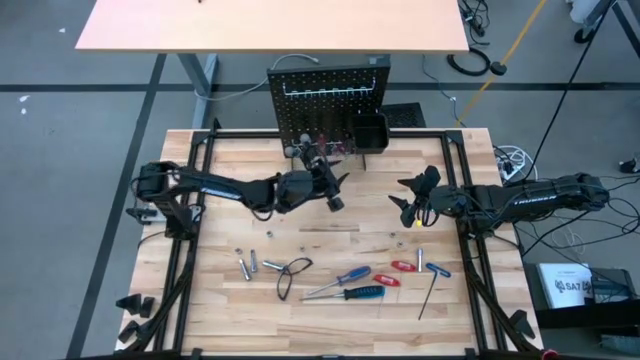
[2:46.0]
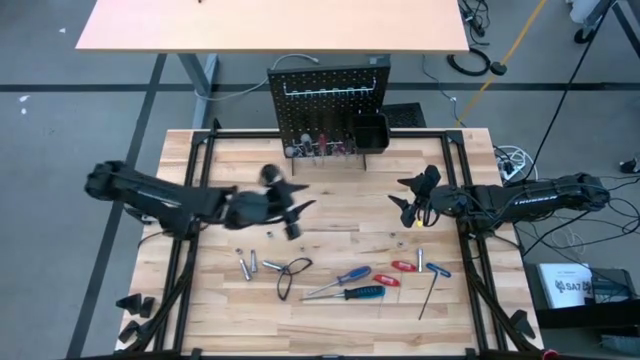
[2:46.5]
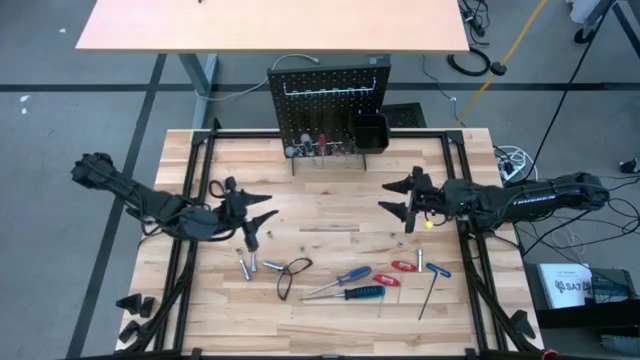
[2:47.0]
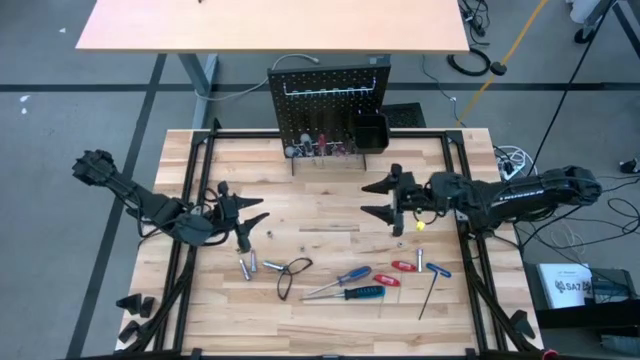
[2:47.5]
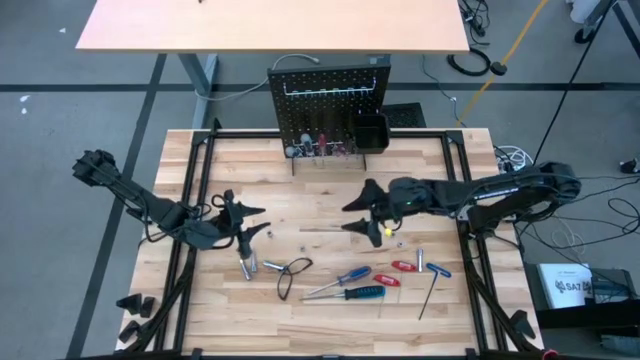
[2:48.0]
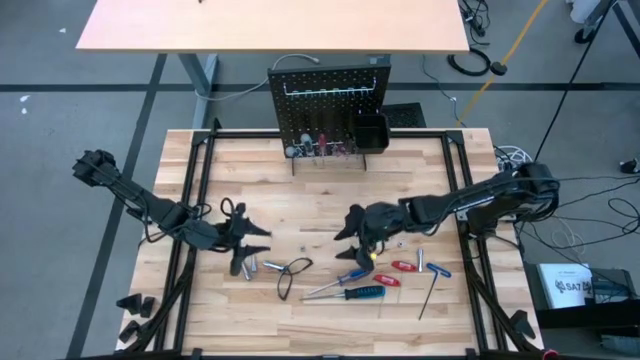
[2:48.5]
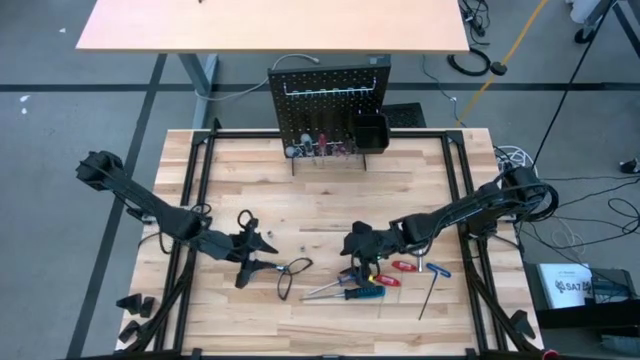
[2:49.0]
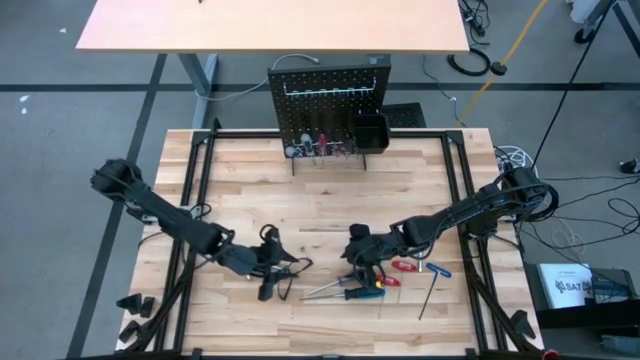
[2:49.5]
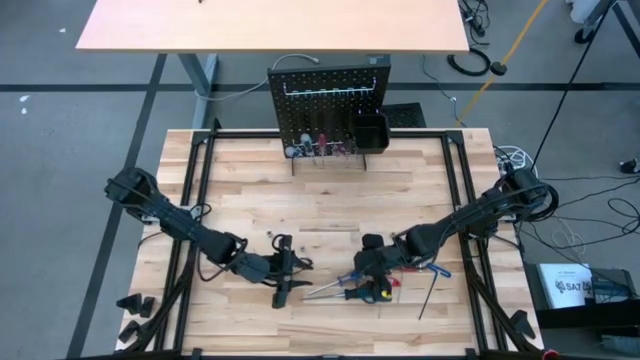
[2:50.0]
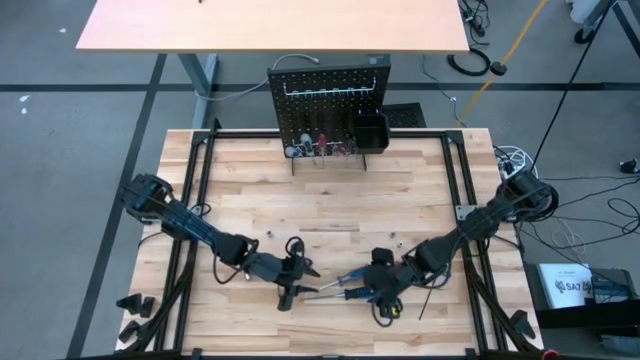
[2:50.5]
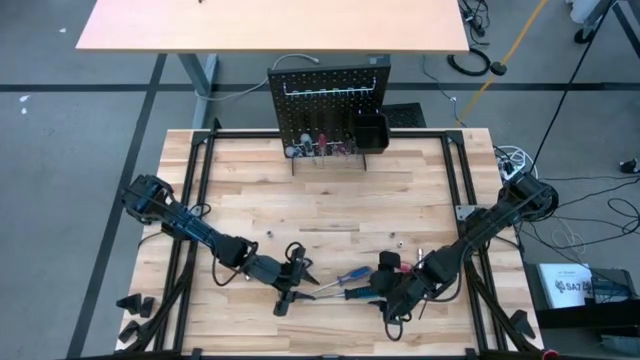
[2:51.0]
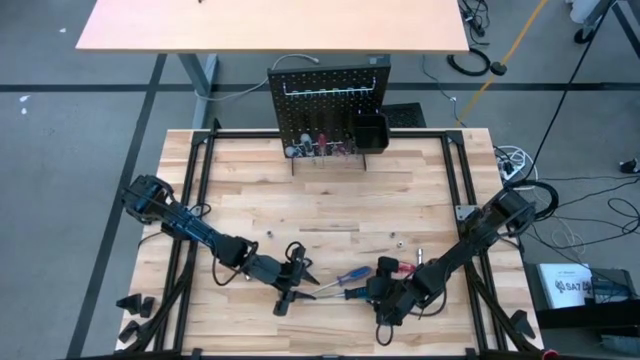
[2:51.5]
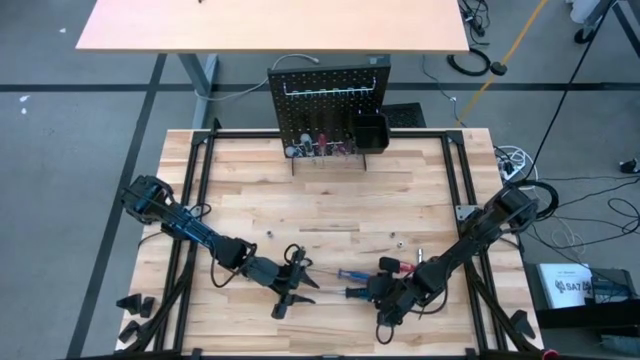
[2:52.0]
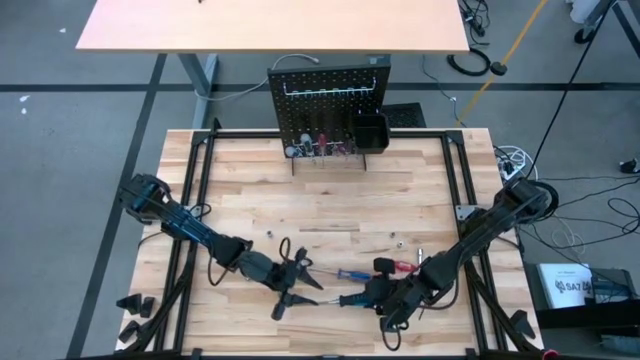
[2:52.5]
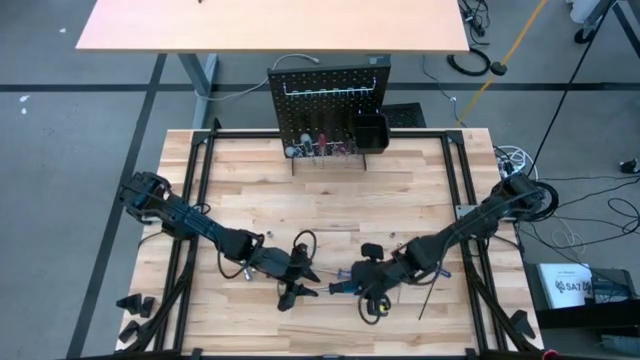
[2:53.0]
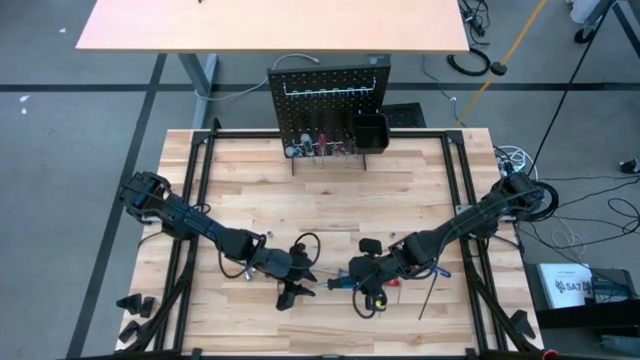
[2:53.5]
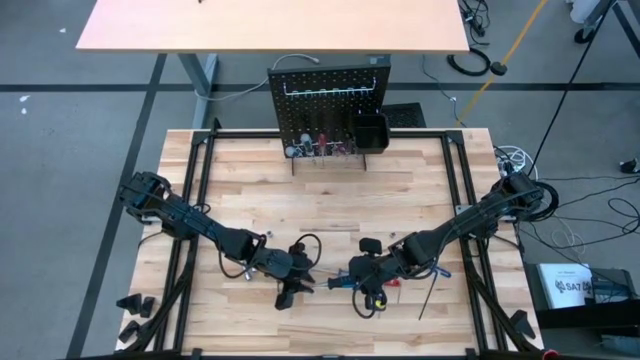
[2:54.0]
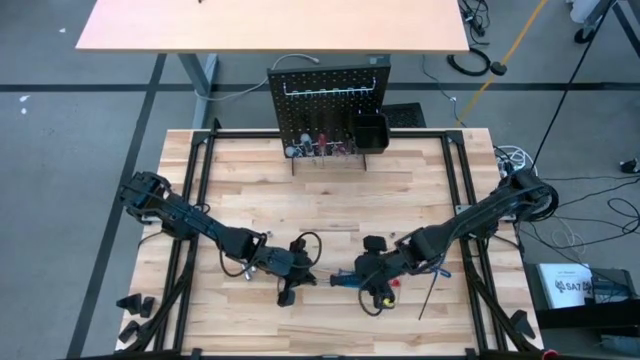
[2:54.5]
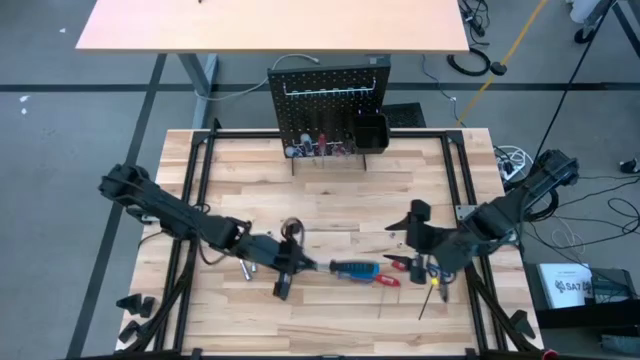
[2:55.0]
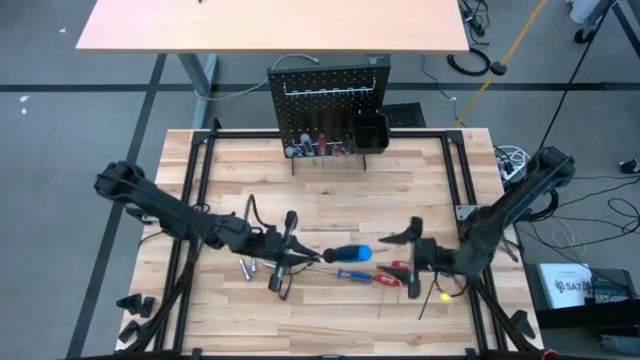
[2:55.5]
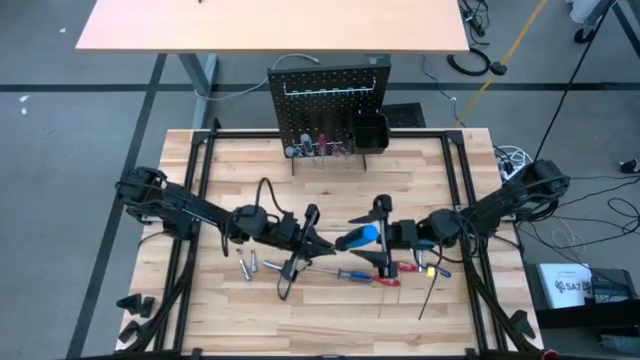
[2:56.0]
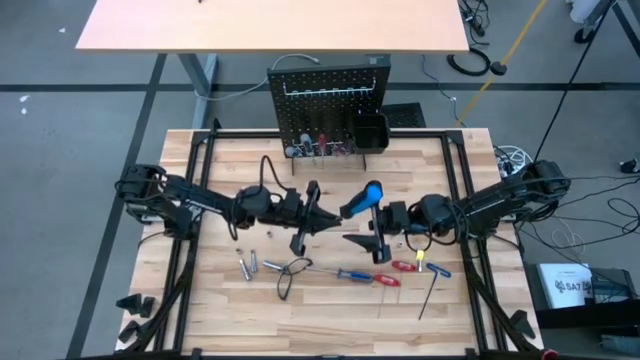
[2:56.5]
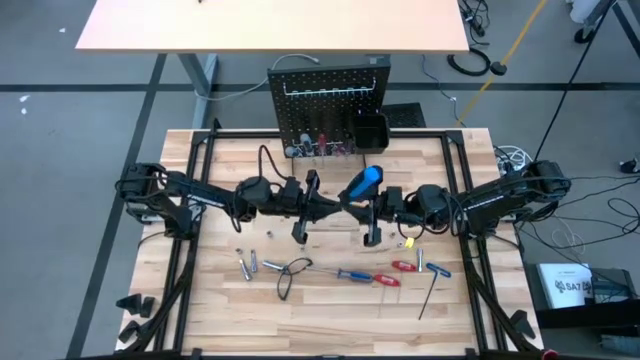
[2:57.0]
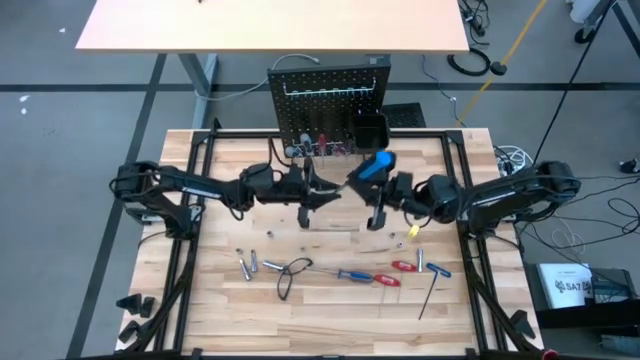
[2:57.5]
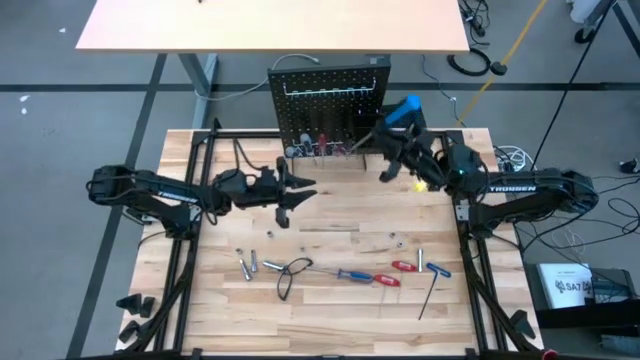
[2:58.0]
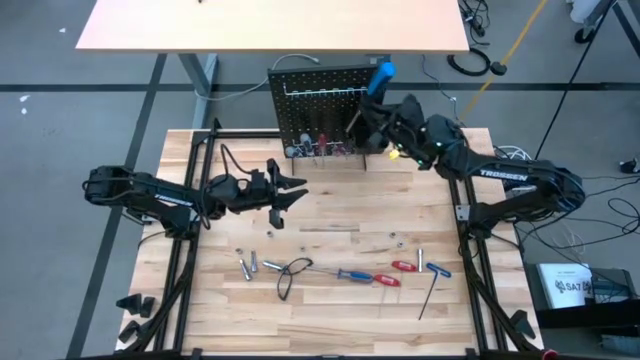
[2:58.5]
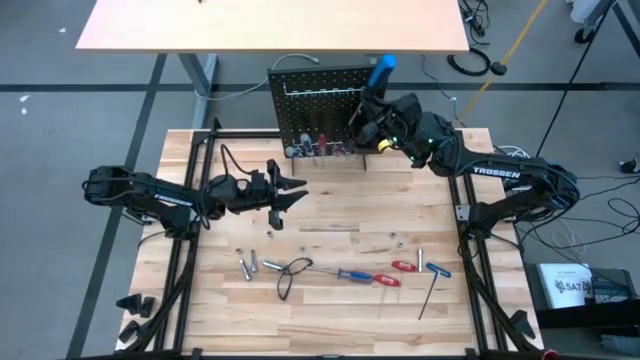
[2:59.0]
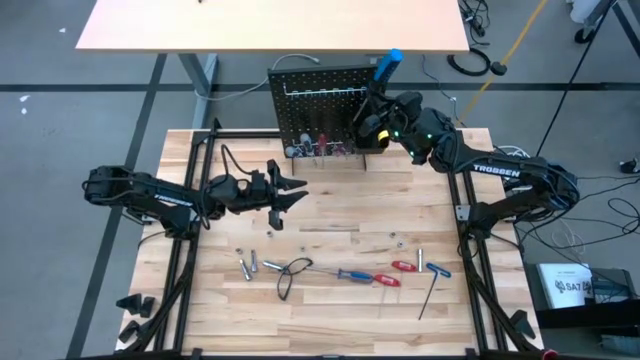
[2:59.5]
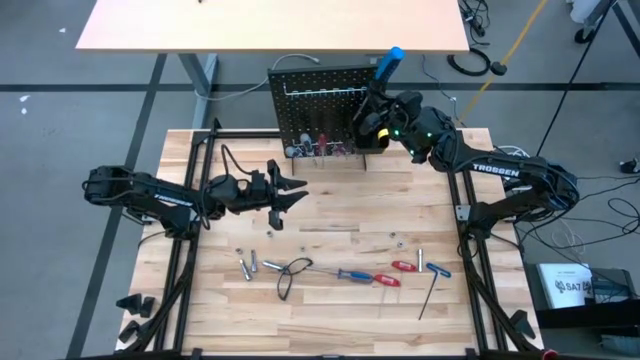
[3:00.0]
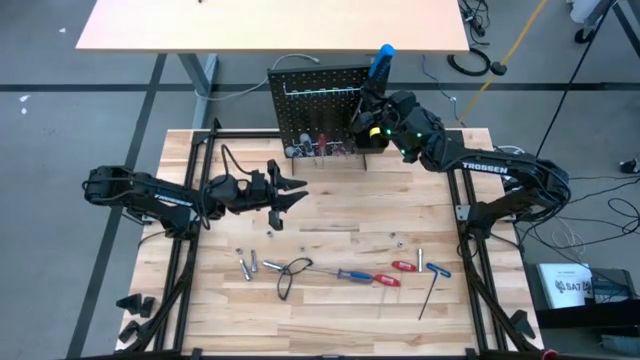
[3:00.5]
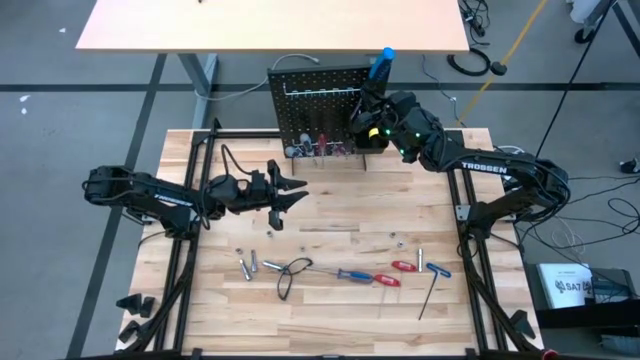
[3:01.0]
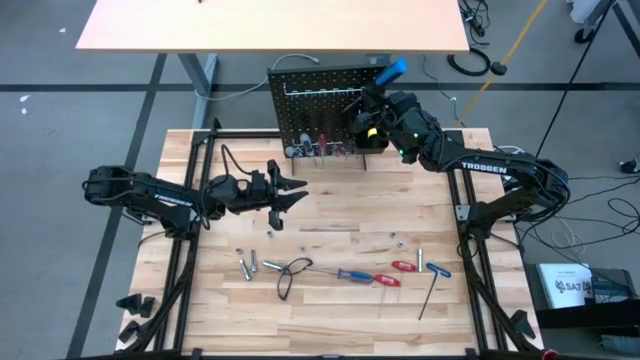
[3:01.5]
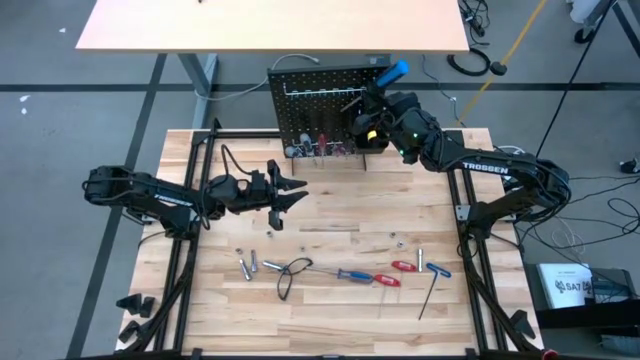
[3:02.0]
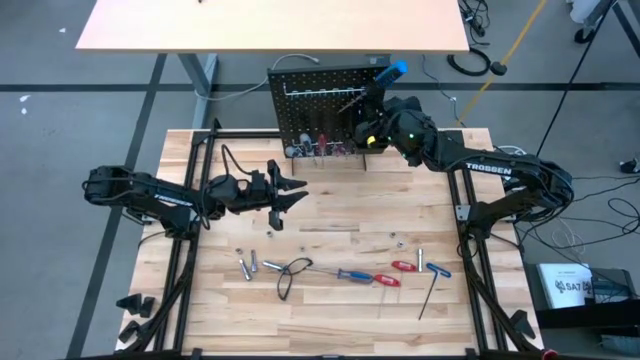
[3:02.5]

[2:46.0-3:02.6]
Task: Hang tools onto peg board
Hang the black blue screwdriver on the peg board

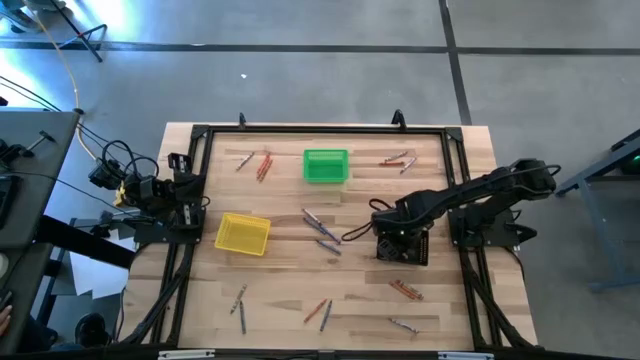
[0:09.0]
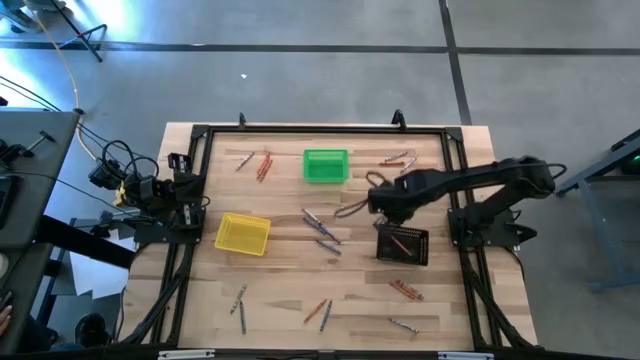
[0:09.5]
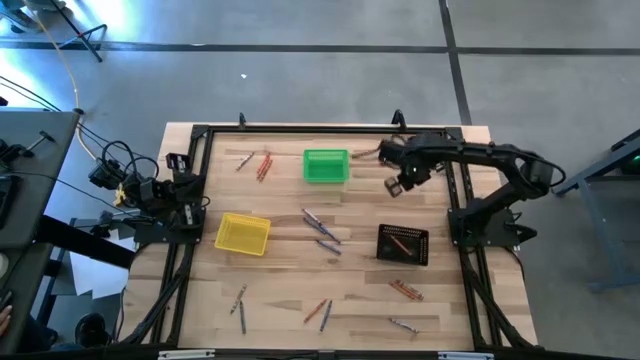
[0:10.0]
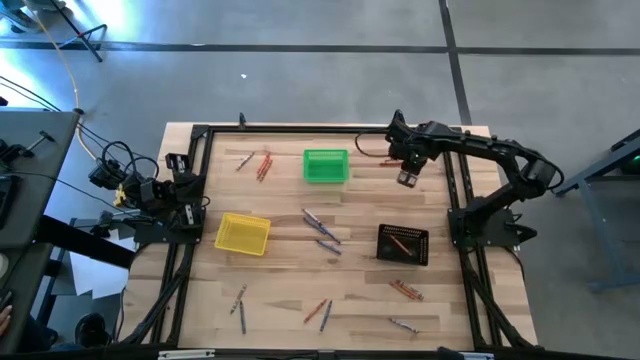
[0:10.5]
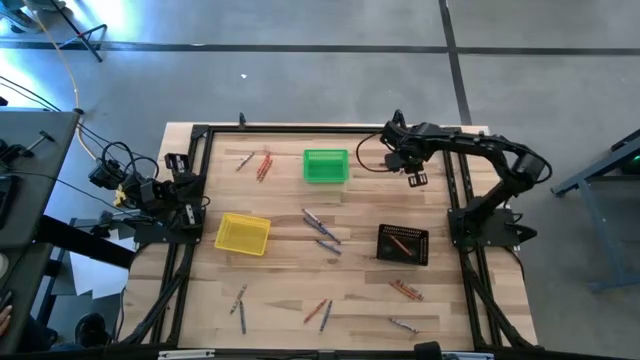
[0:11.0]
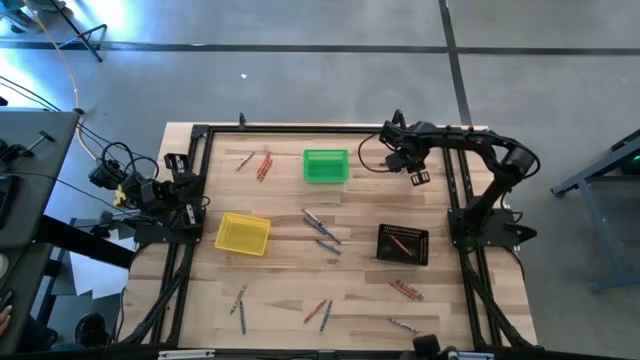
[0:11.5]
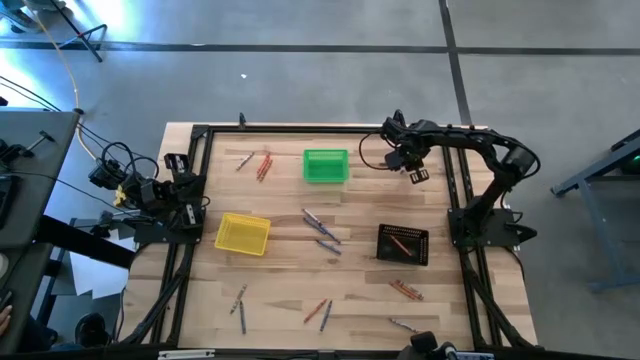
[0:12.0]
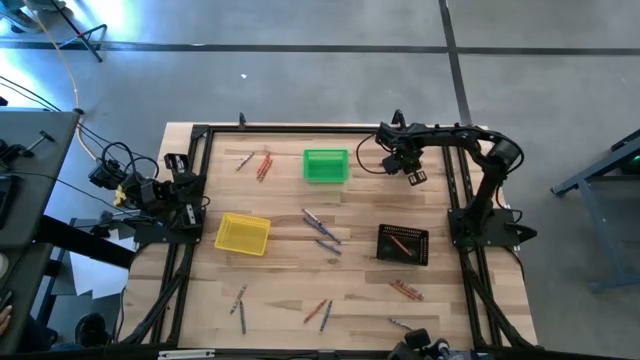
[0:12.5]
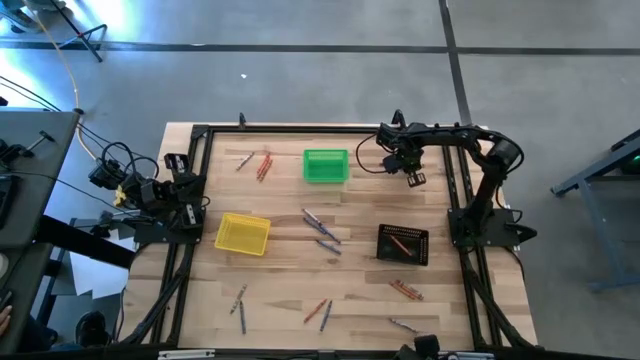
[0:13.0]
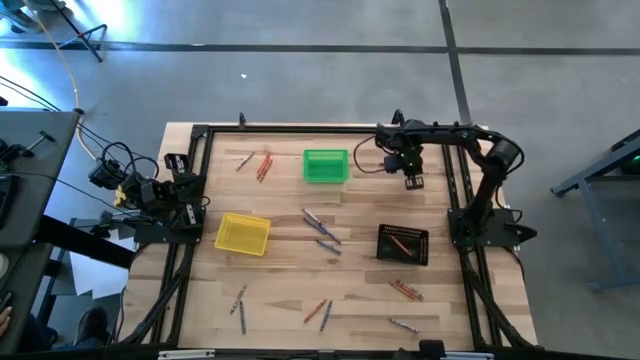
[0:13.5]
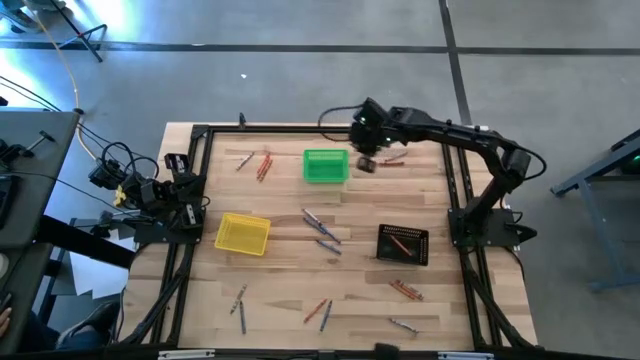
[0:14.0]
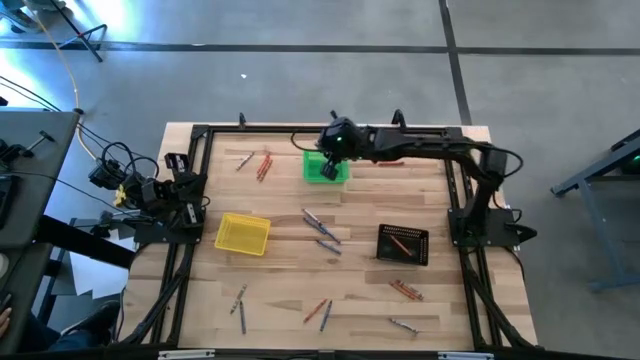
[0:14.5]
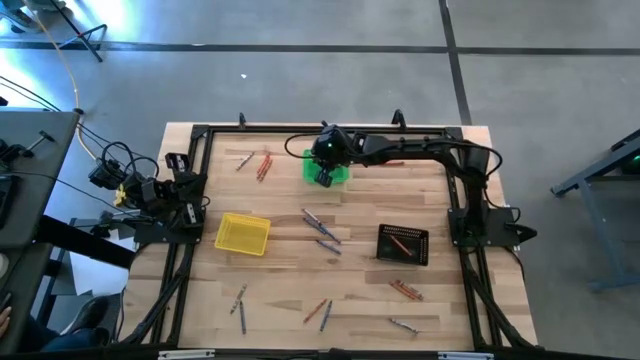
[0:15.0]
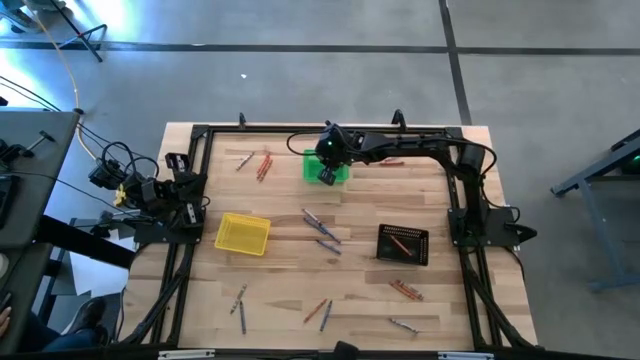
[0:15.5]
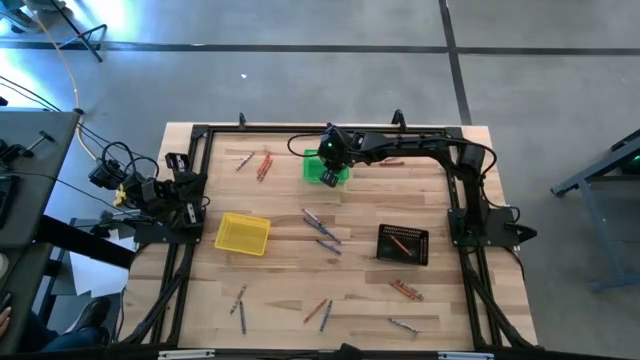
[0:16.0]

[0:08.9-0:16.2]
Task: Sort crayons
Put the gray crayon into the green basket
